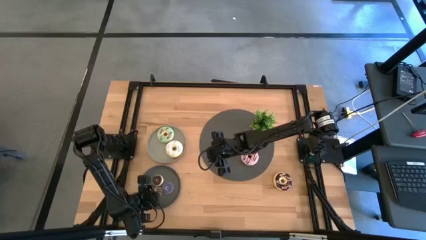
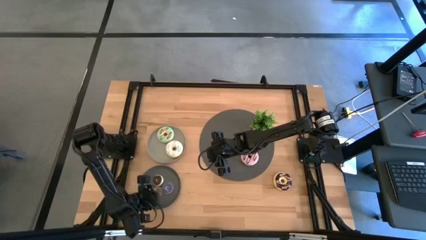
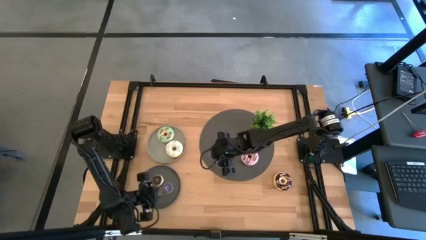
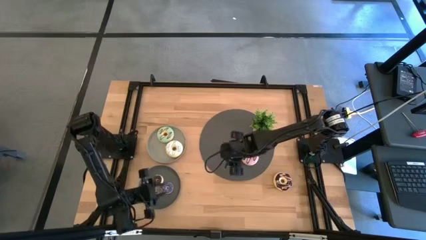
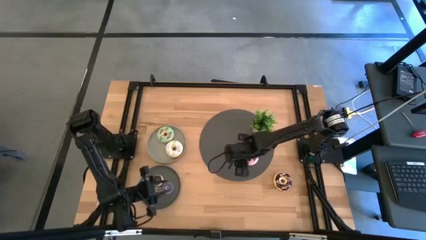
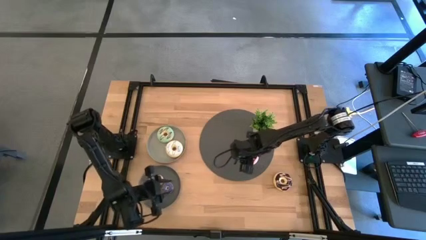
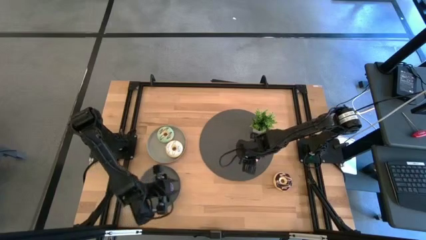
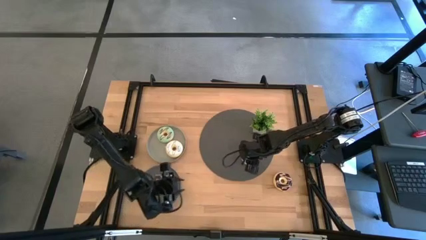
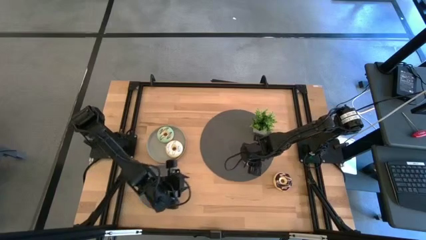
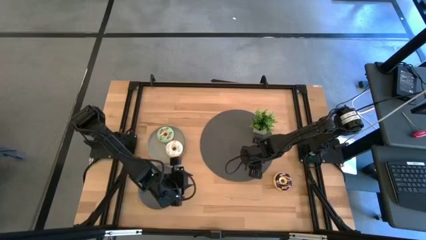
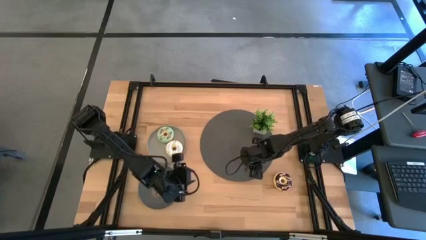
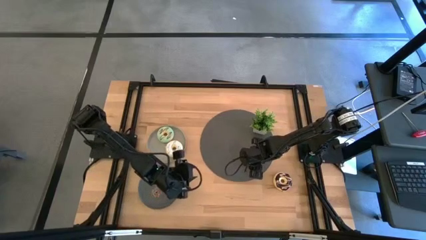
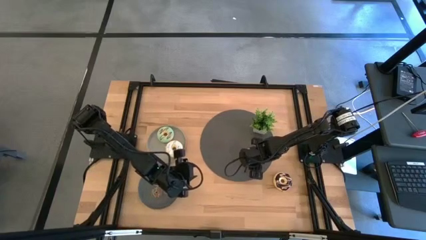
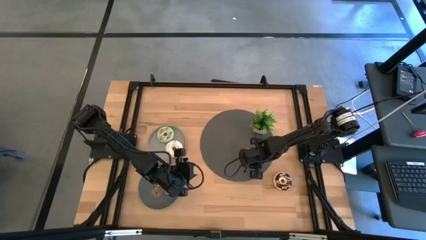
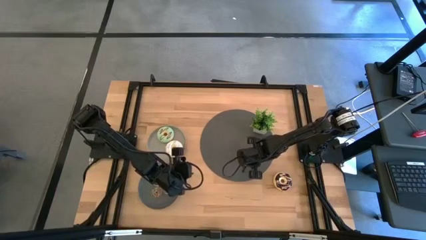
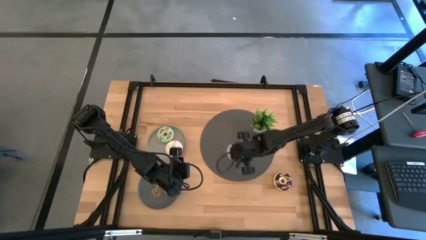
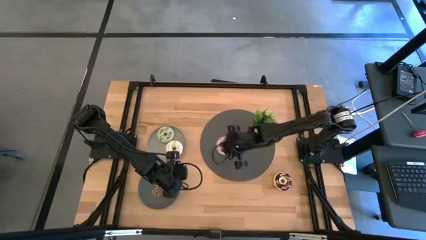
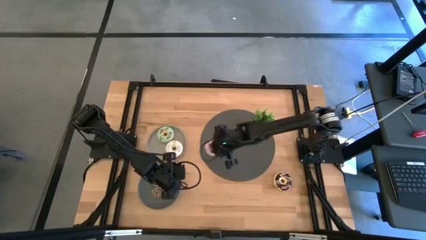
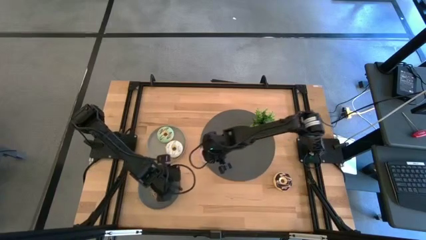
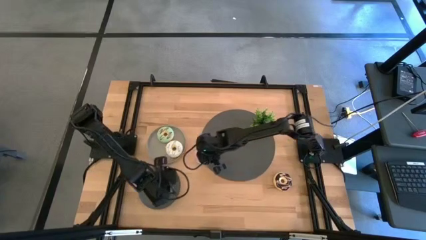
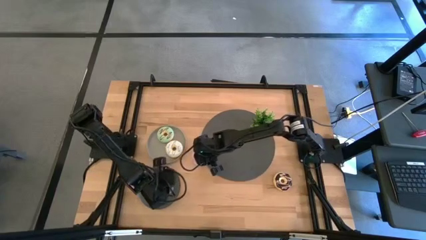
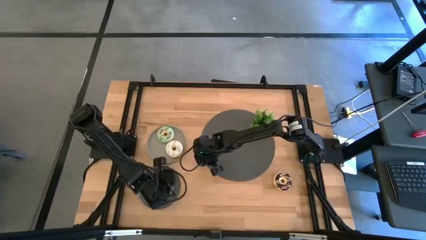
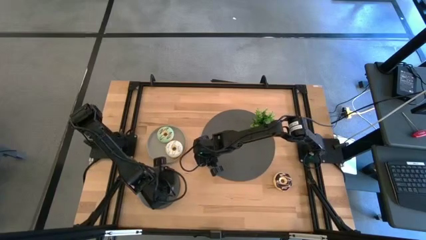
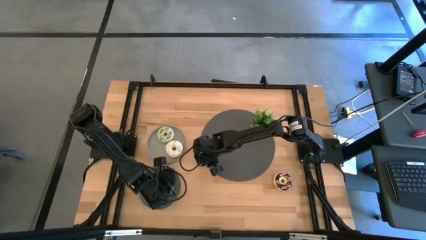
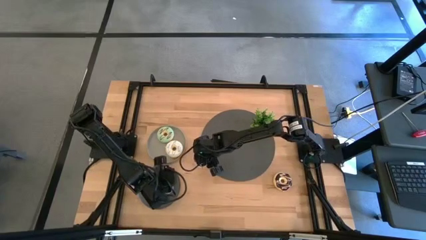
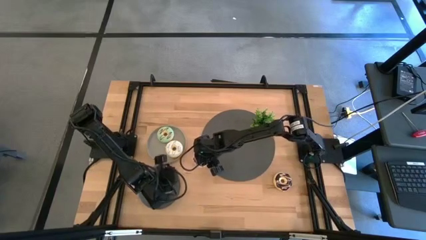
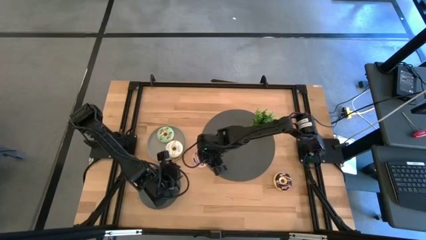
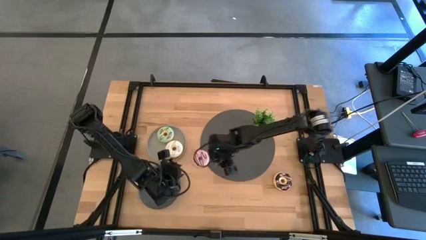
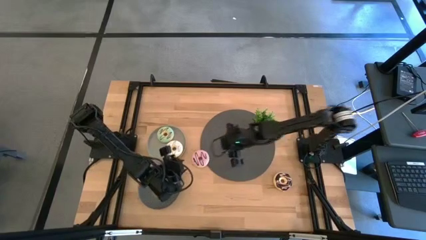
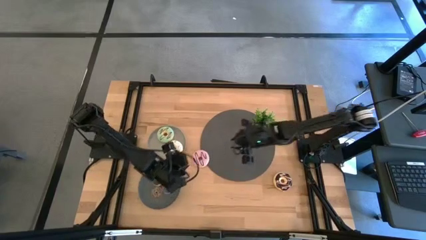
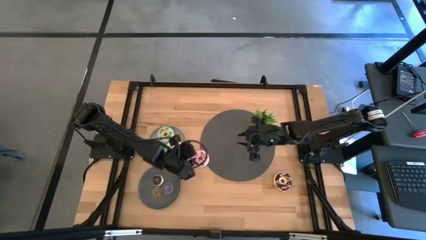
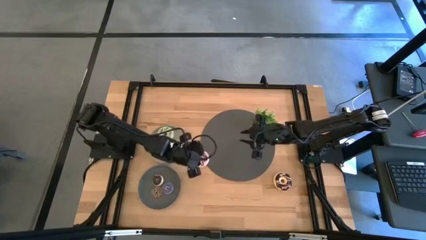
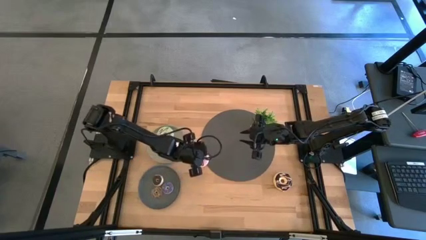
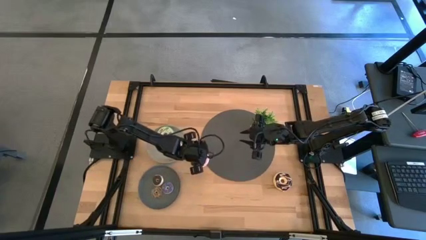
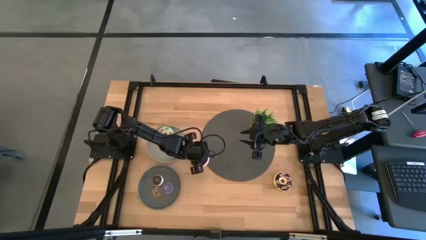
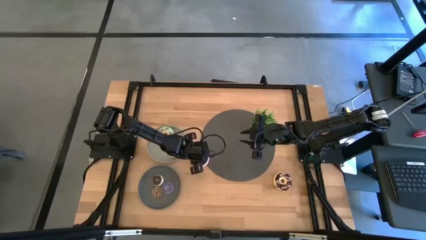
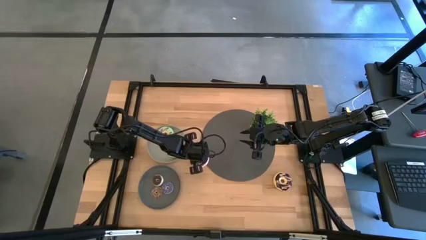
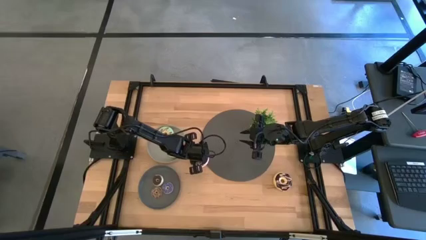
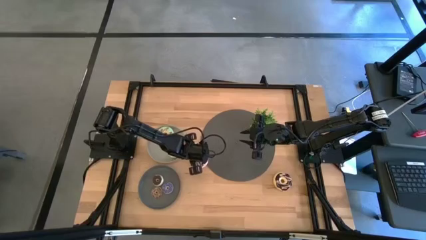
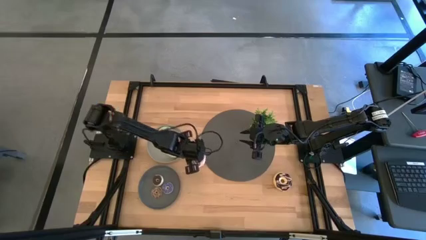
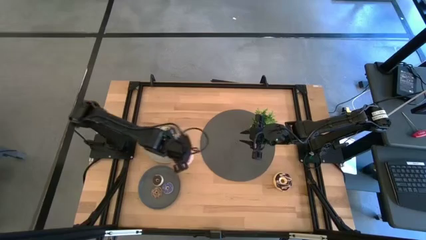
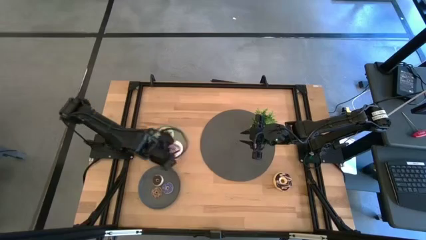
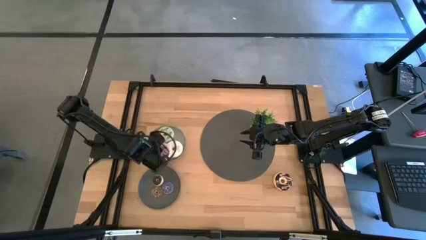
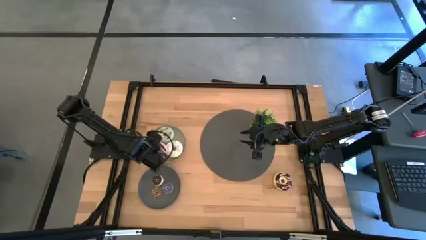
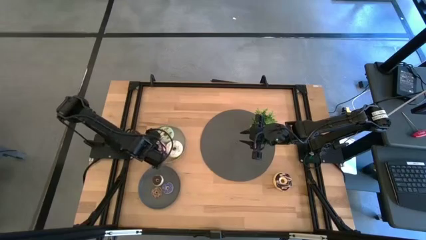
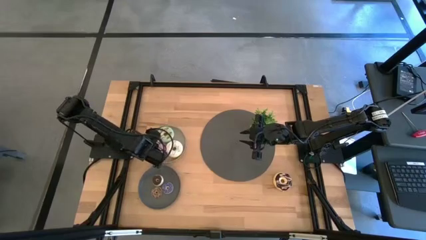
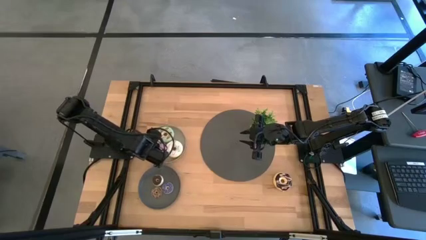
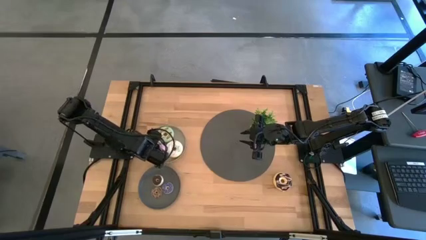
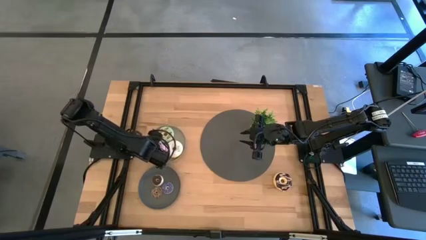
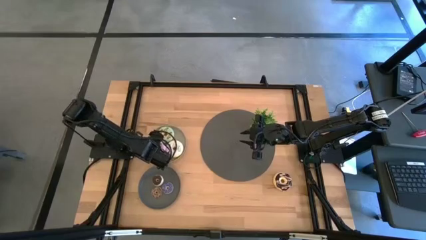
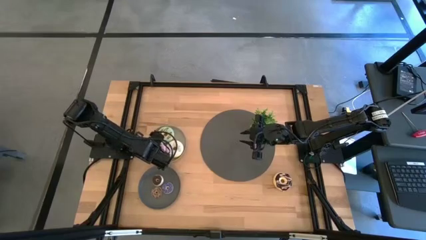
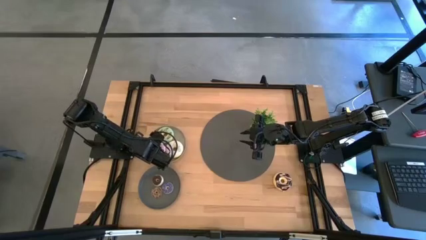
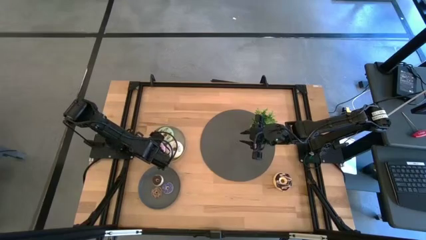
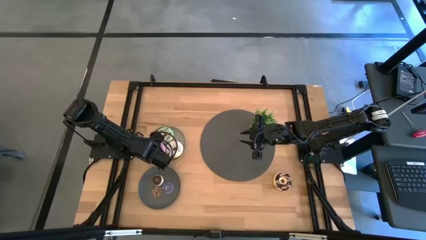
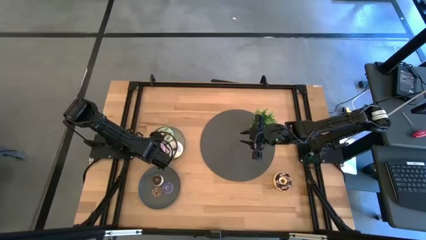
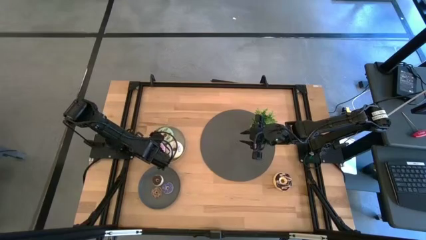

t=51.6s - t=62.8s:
Task: Pick & Place donuts
Put the big purple donut on the light gray plate

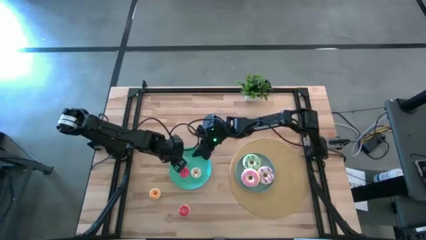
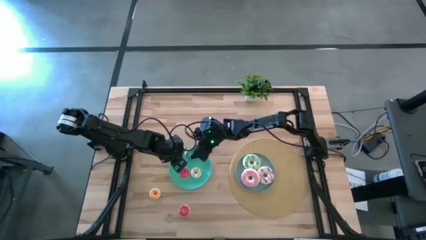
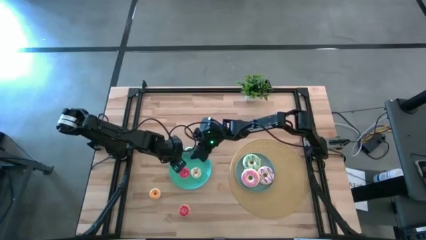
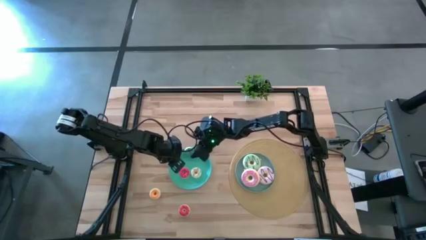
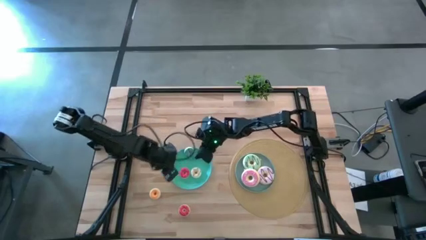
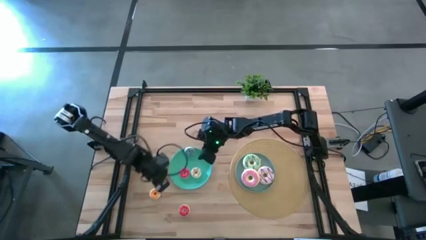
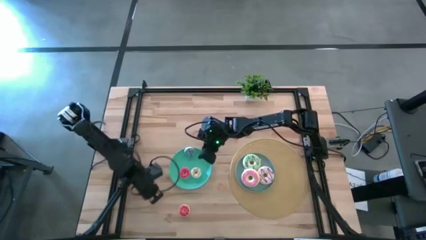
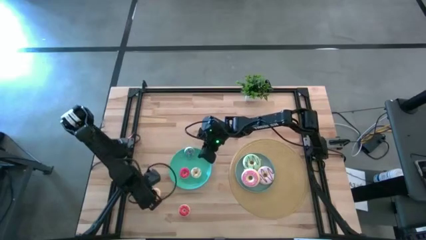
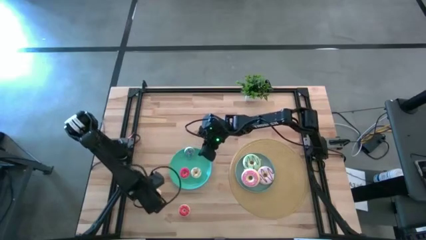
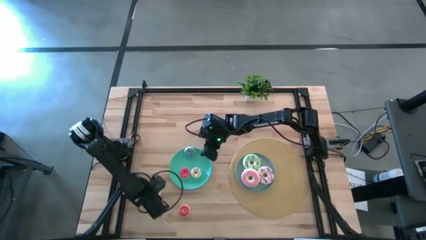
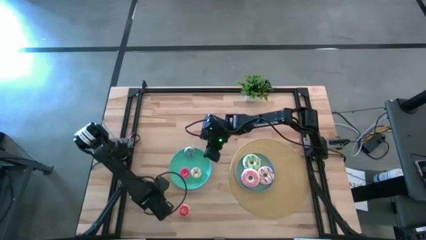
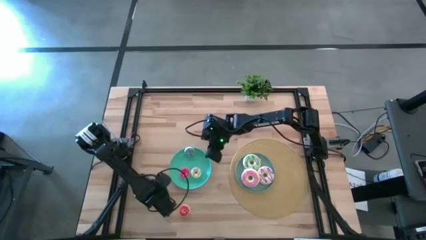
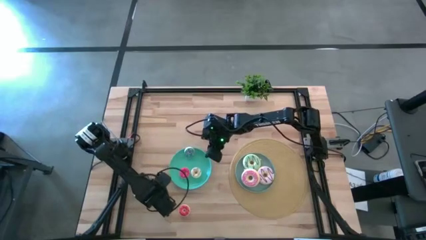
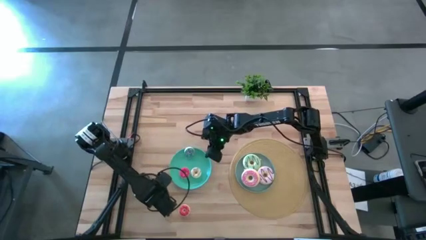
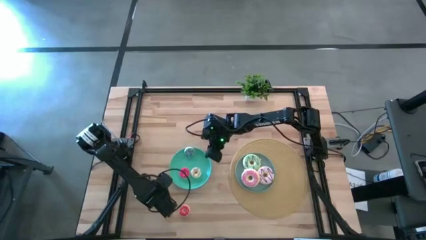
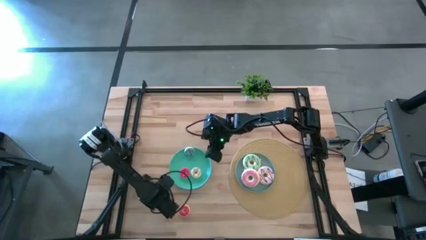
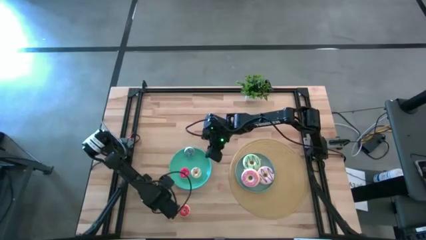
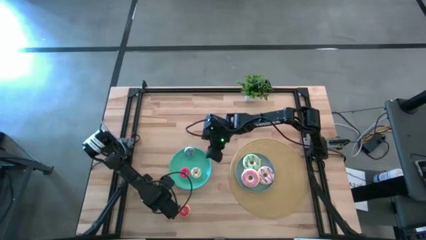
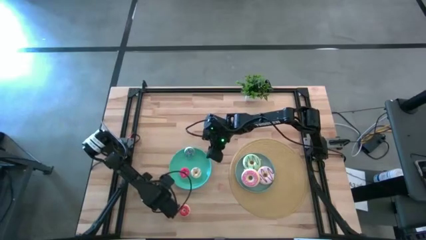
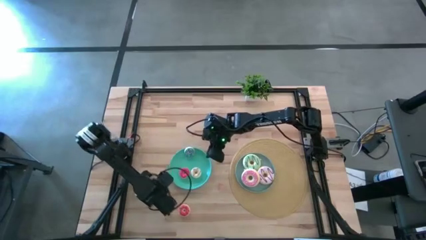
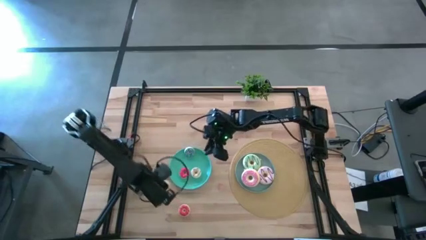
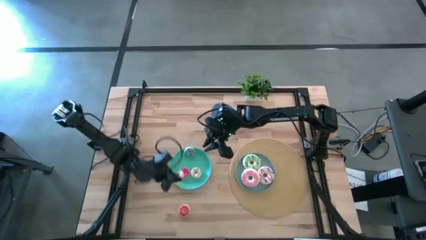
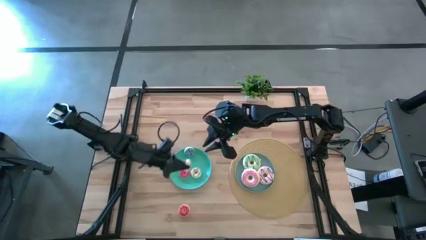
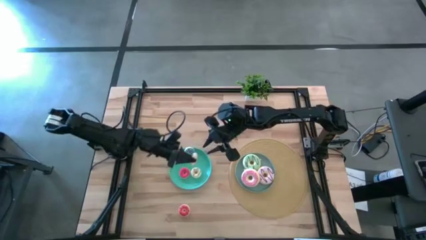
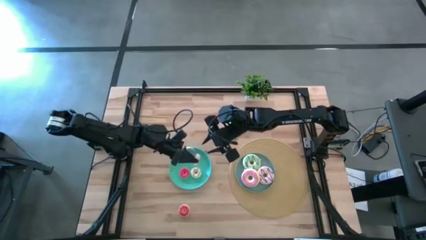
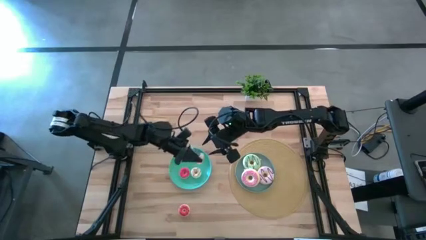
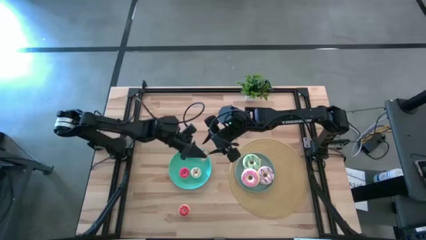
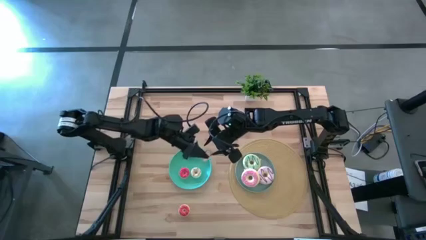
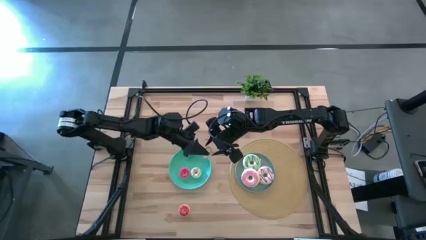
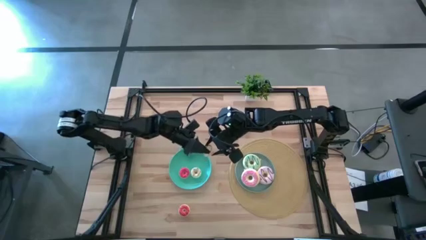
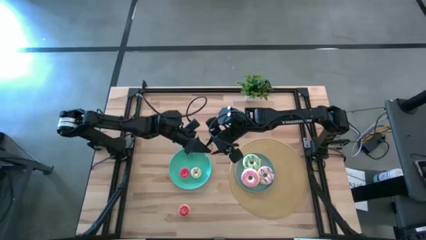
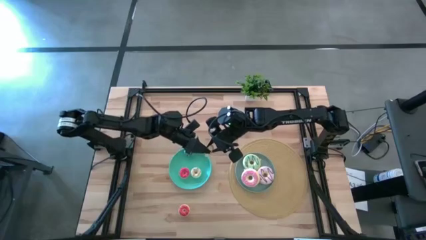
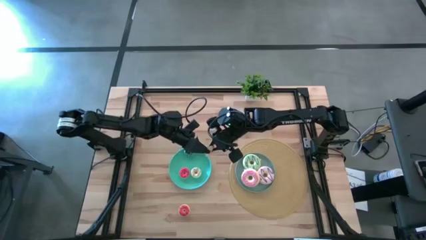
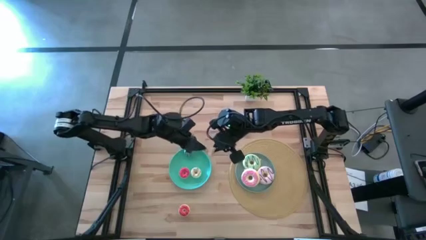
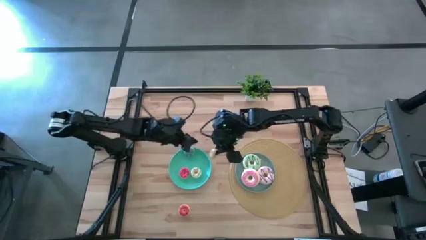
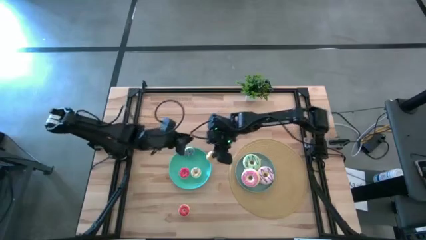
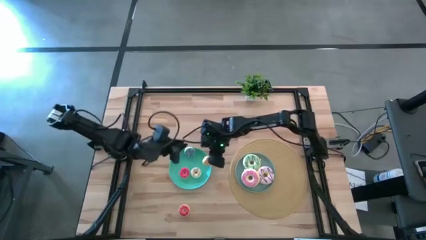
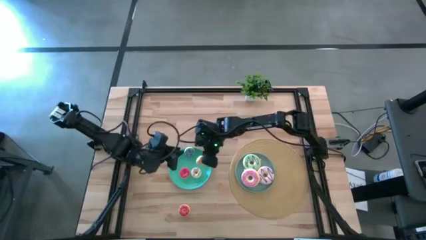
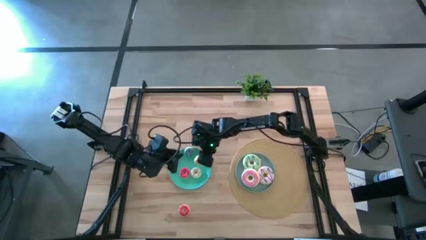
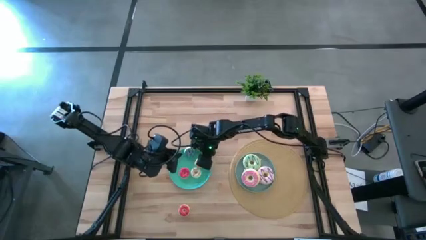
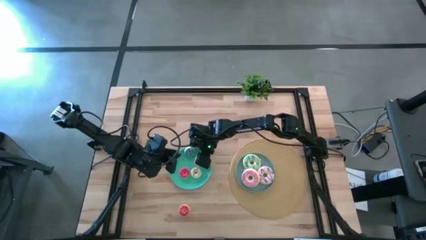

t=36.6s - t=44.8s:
Task: Pick & Place donuts
Put the small yellow donut on the green plate
